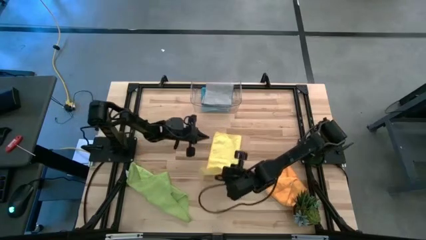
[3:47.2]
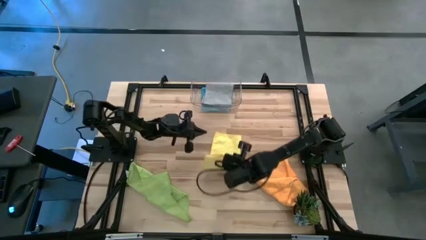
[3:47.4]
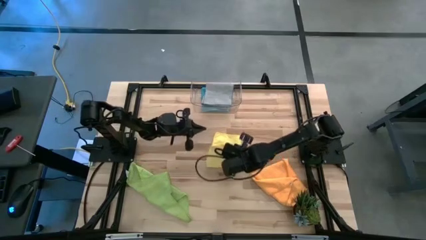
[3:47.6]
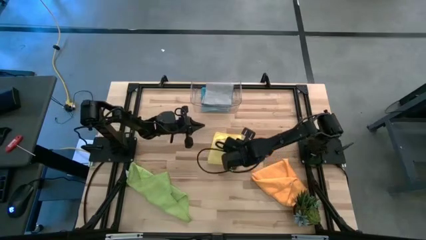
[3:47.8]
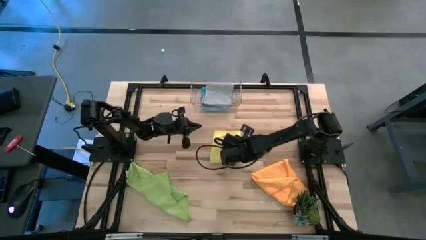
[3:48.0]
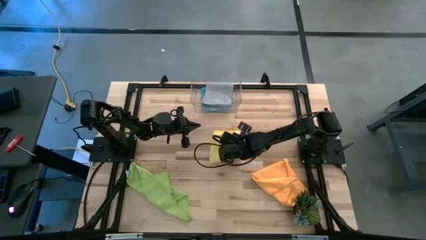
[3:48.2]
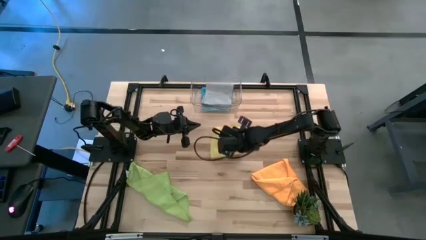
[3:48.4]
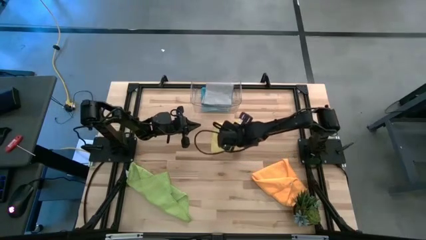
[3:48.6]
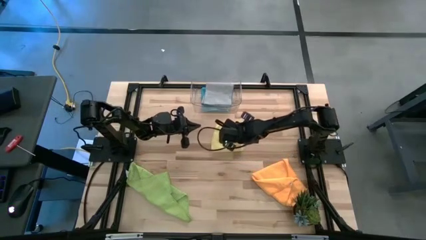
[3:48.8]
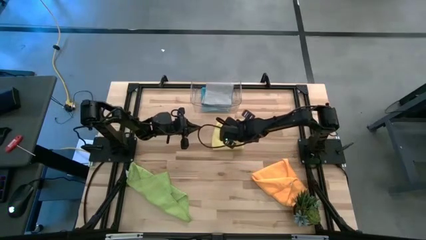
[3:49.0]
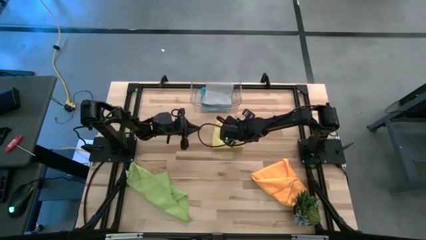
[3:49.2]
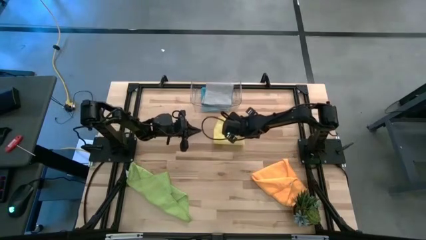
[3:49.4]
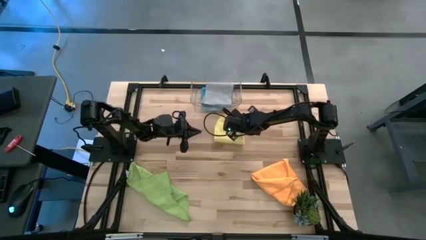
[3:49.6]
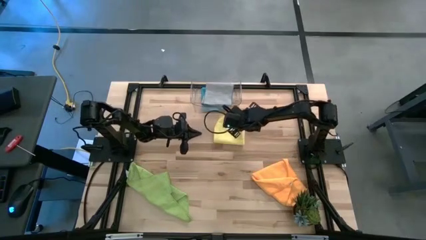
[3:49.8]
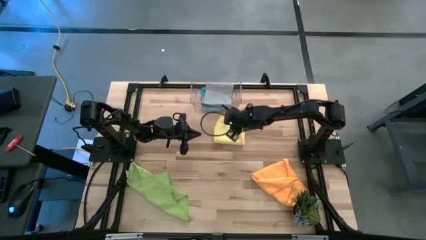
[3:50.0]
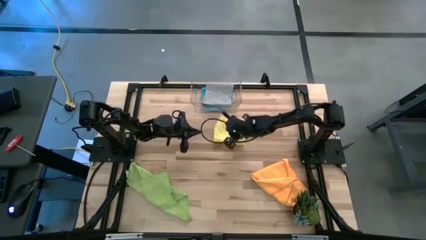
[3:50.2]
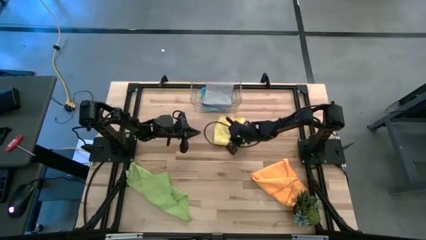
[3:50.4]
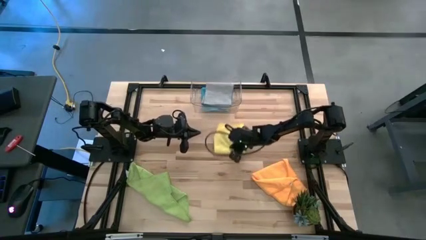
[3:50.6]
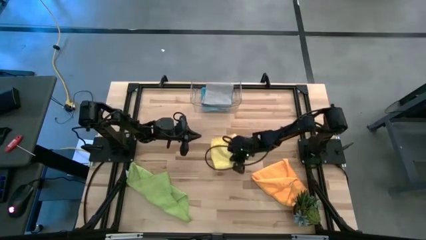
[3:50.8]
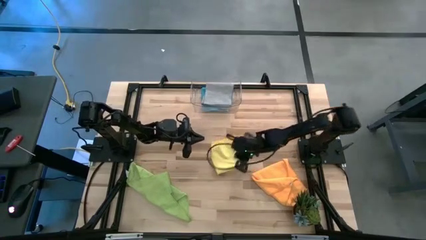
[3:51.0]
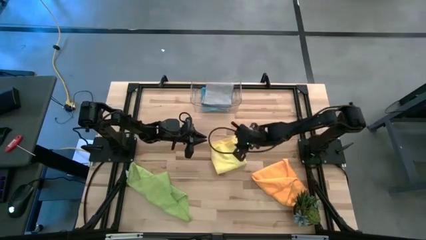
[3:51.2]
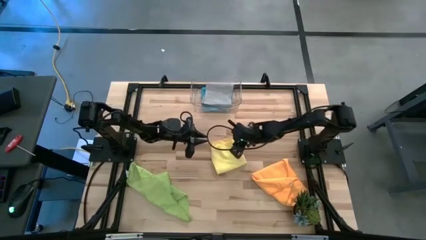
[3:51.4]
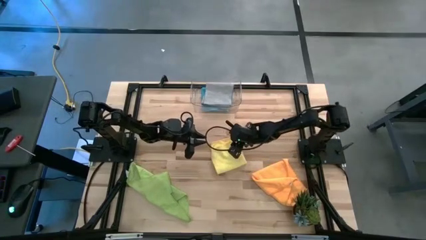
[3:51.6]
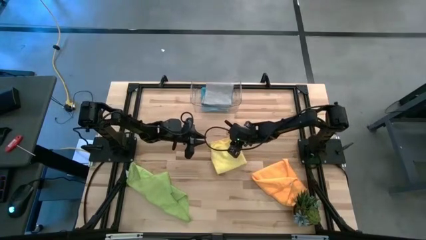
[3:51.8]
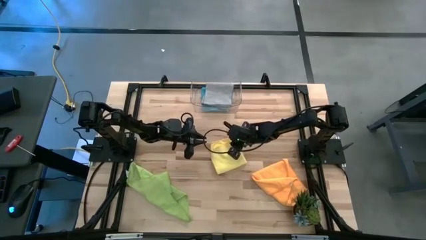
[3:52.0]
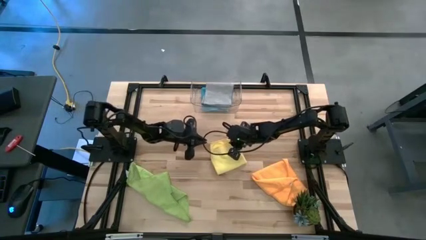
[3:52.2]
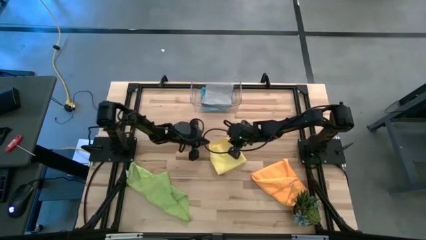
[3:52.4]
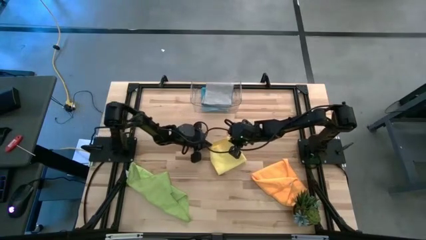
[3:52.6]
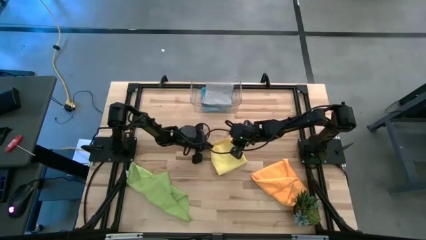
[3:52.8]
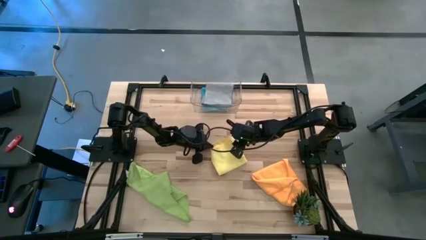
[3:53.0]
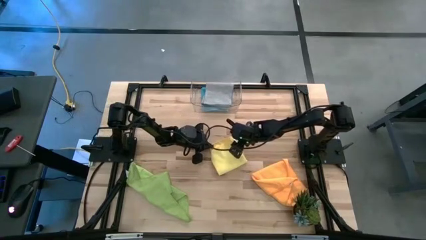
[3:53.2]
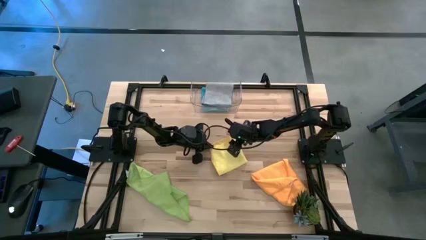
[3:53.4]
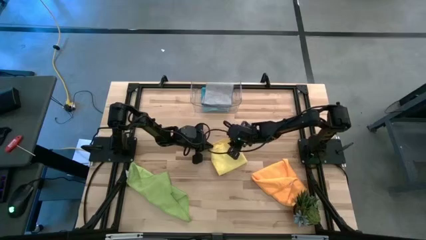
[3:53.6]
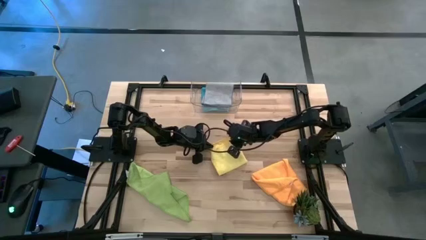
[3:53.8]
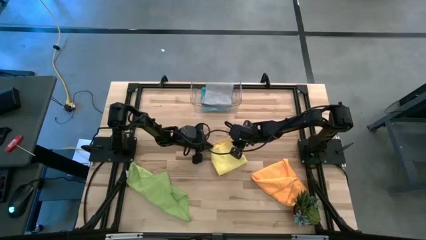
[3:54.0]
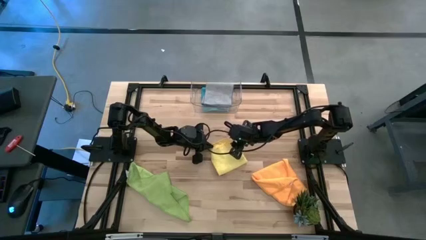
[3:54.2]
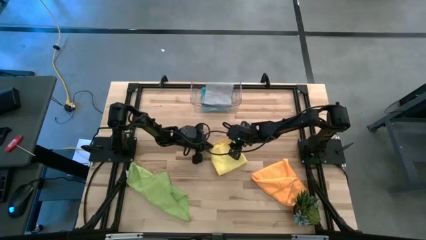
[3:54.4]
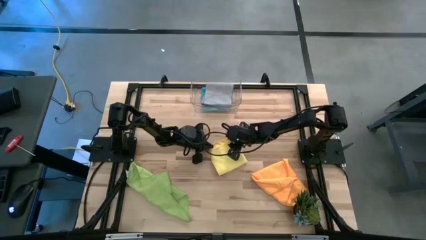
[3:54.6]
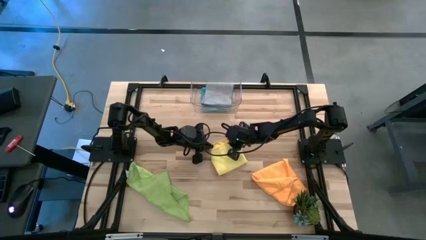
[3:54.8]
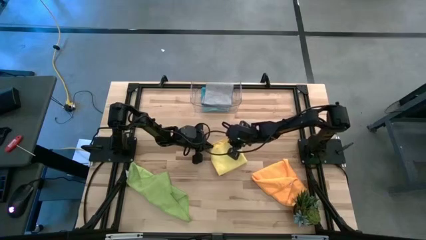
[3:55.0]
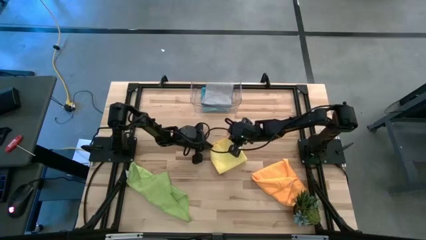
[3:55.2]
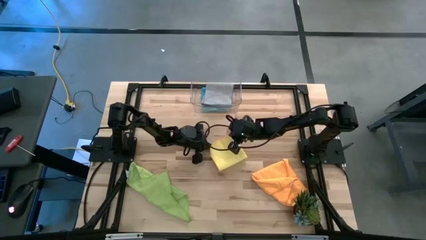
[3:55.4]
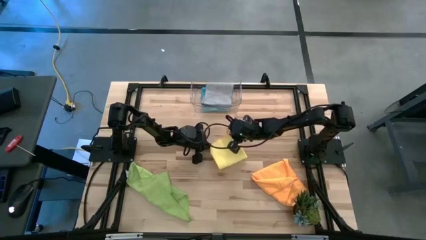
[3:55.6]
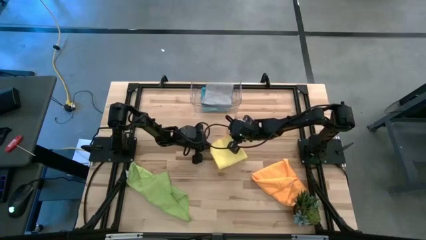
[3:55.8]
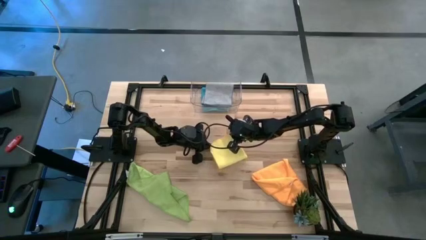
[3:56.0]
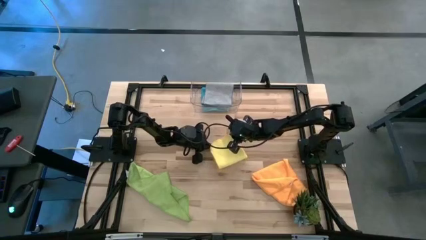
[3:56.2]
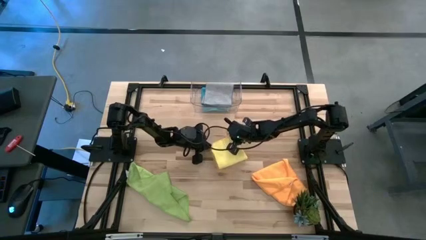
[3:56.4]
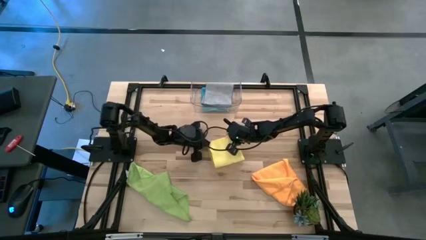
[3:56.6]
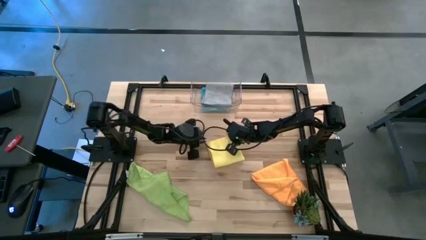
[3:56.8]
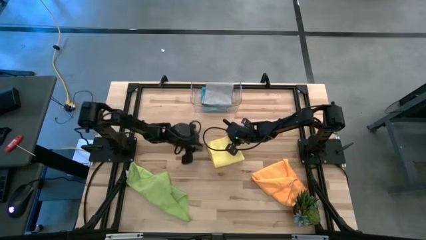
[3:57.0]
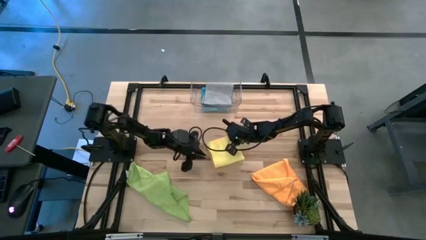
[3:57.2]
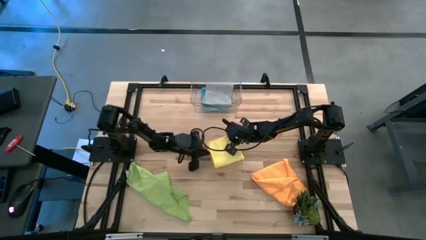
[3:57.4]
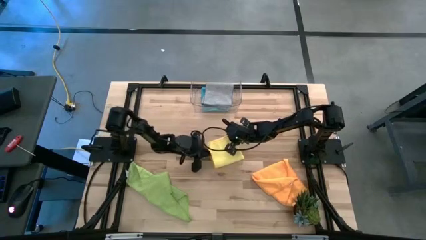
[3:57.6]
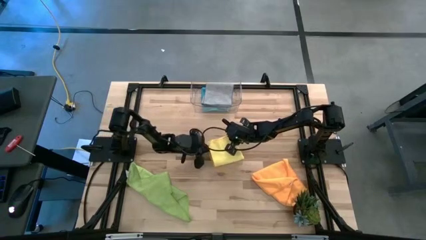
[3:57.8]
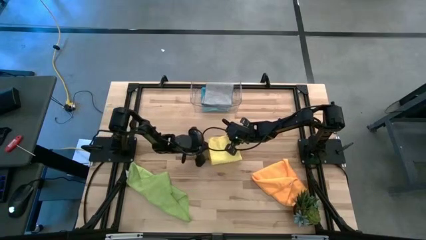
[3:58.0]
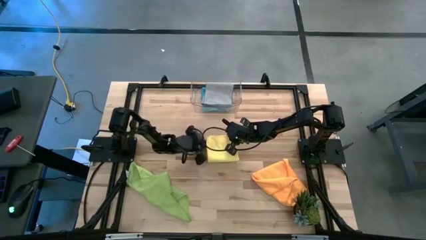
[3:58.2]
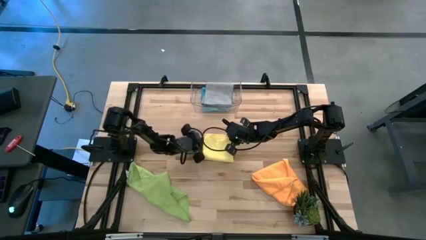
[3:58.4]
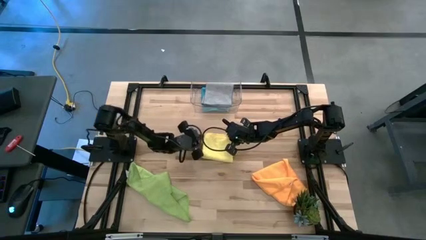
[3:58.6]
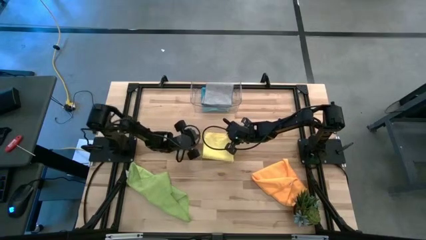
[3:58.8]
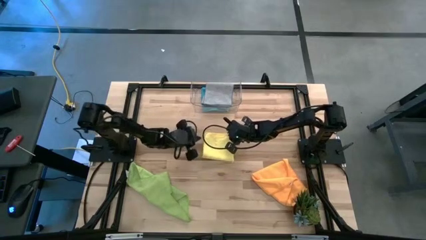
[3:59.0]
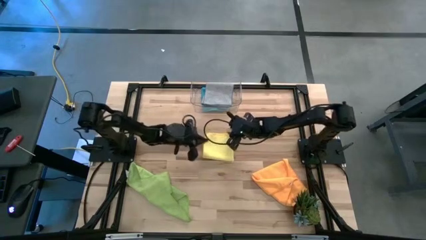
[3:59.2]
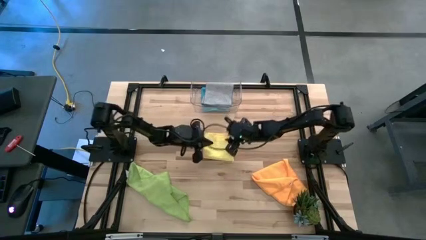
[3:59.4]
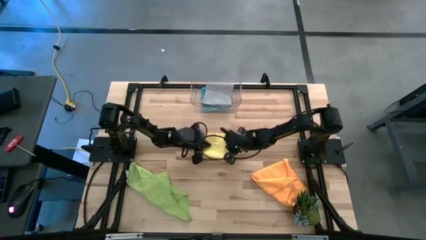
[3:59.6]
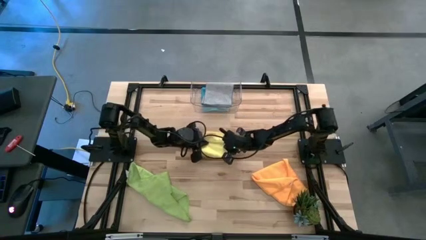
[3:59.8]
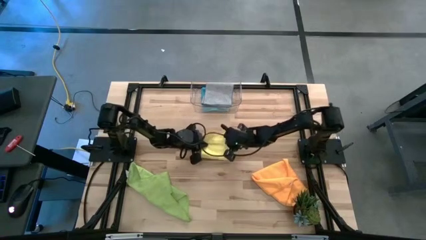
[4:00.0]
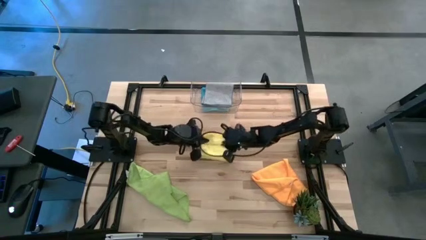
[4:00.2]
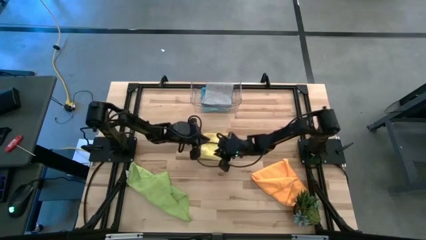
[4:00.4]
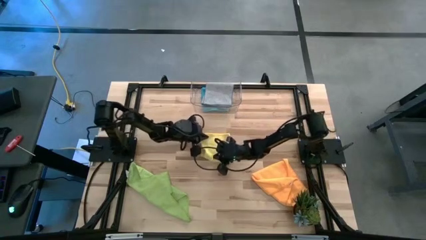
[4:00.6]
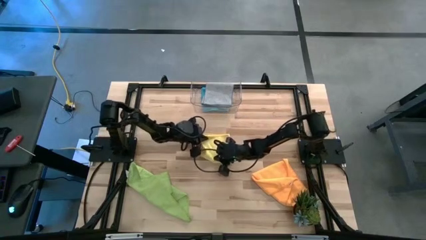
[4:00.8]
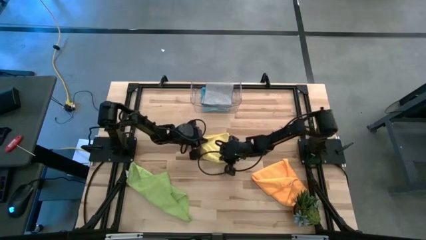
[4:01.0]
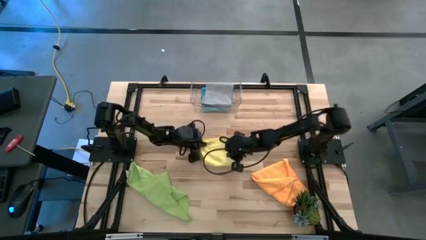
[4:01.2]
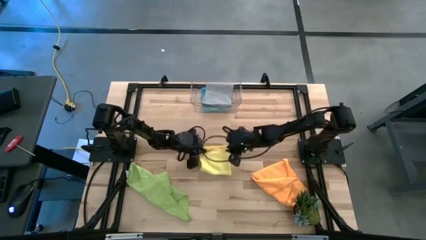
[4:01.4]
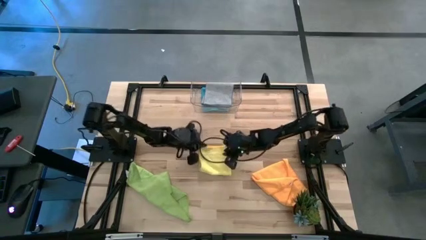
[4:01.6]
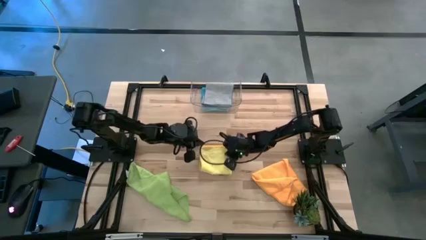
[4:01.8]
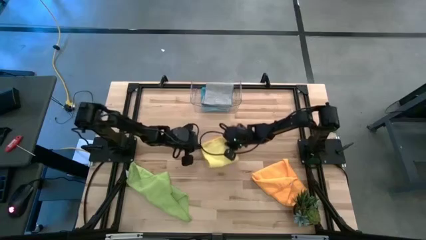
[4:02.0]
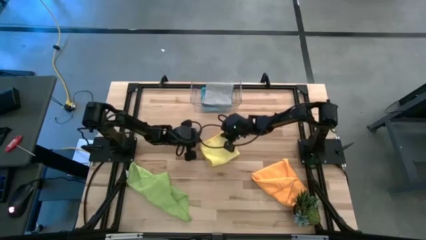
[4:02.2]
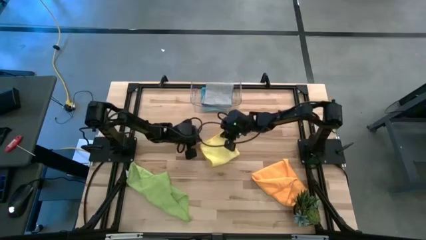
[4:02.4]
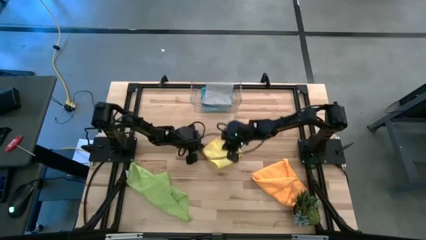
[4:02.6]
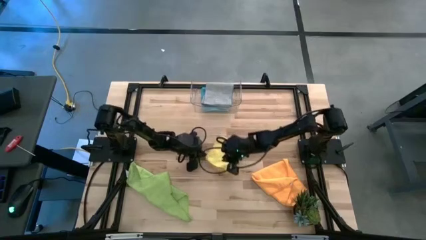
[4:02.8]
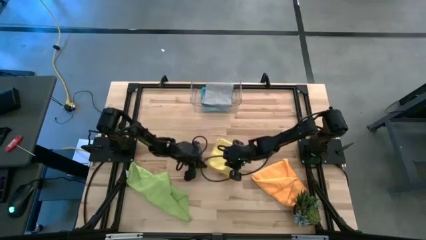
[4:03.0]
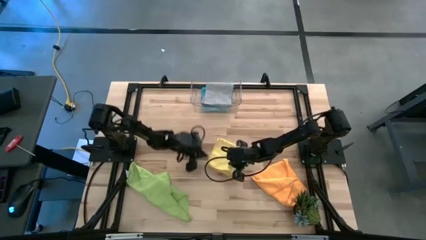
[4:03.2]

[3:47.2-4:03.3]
Task: Fold microfiber towels
Fold the yellow towel
